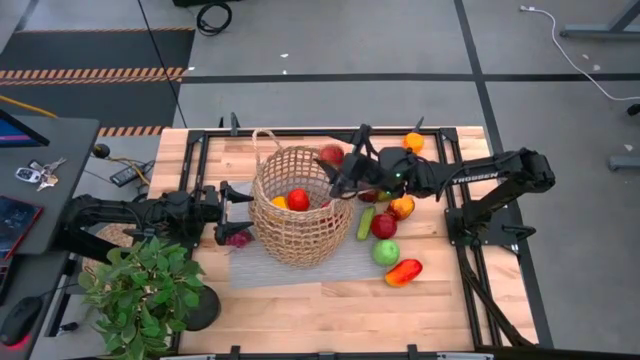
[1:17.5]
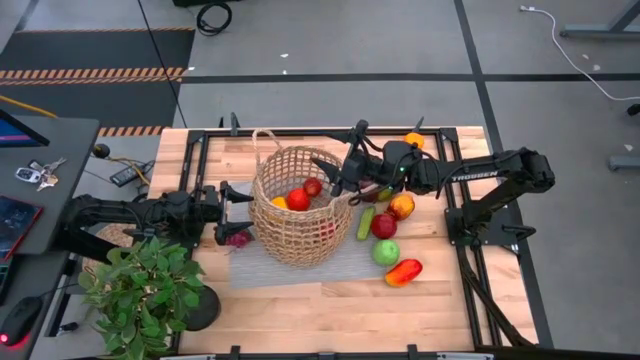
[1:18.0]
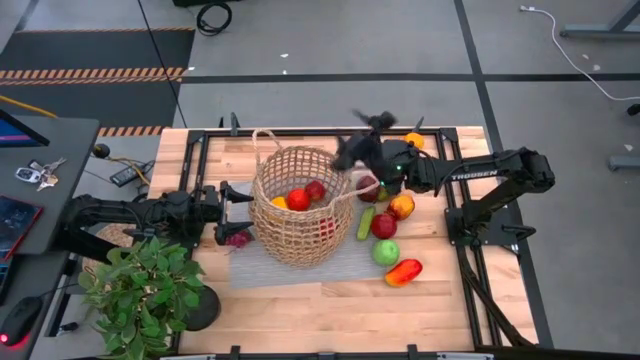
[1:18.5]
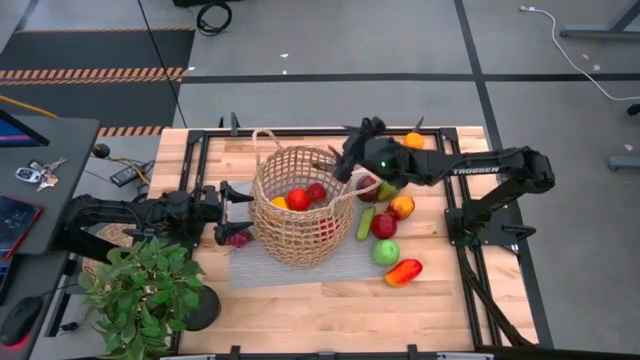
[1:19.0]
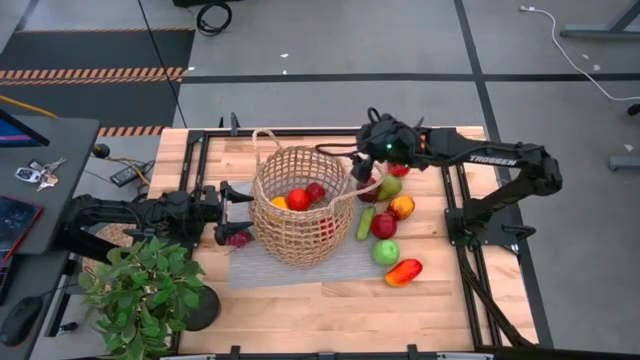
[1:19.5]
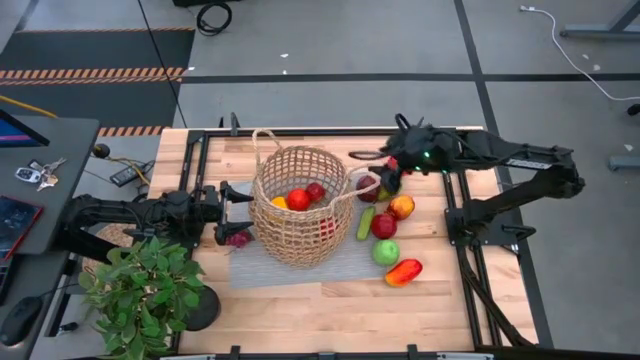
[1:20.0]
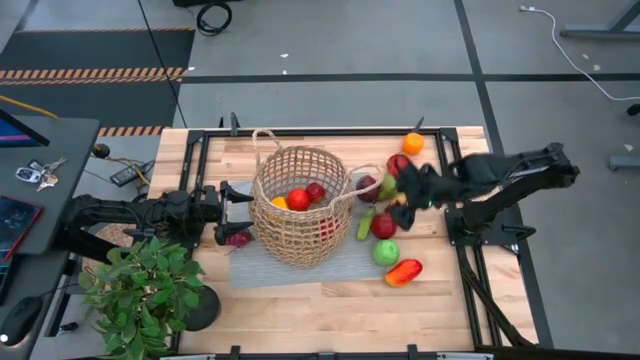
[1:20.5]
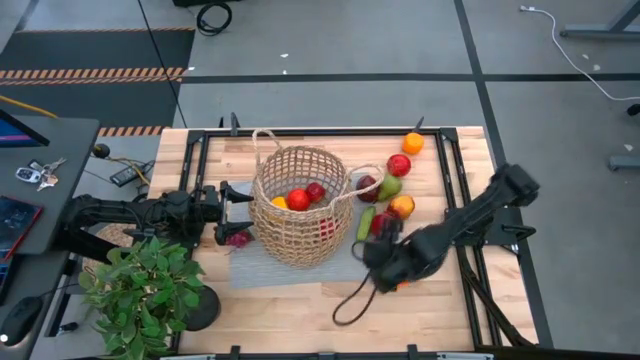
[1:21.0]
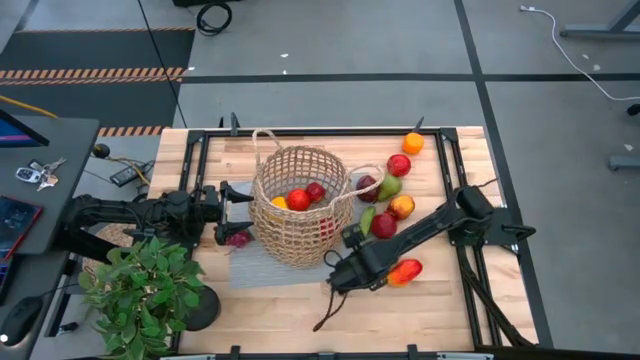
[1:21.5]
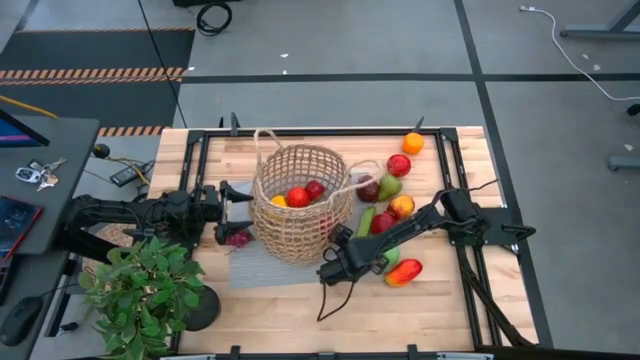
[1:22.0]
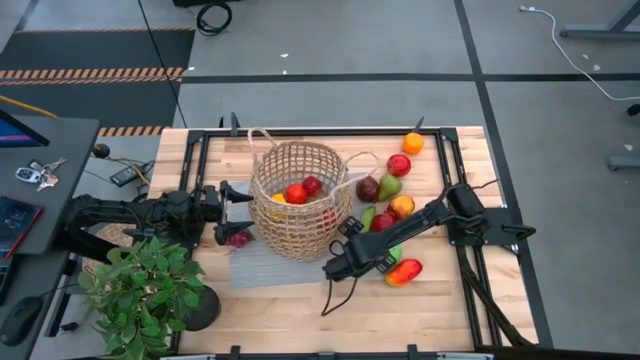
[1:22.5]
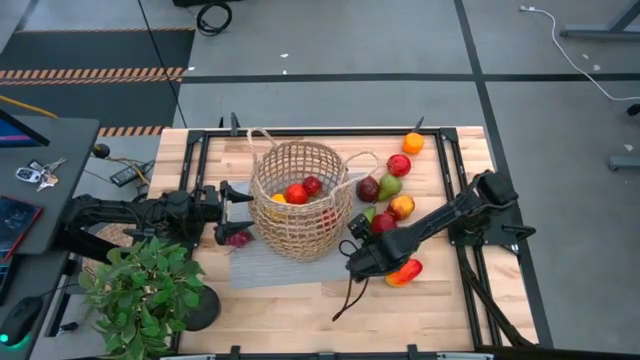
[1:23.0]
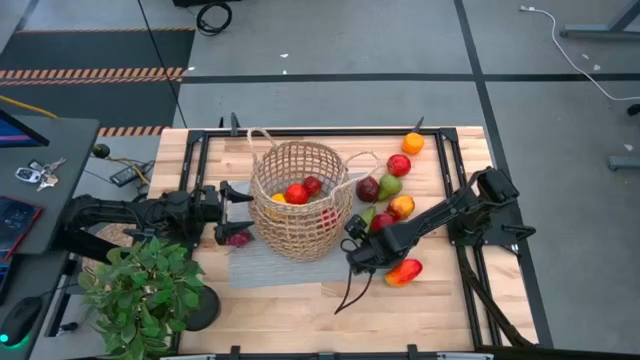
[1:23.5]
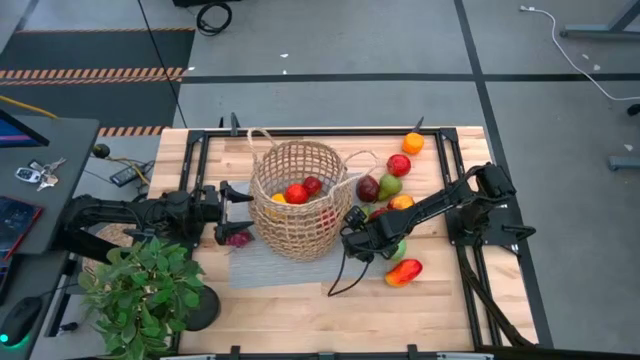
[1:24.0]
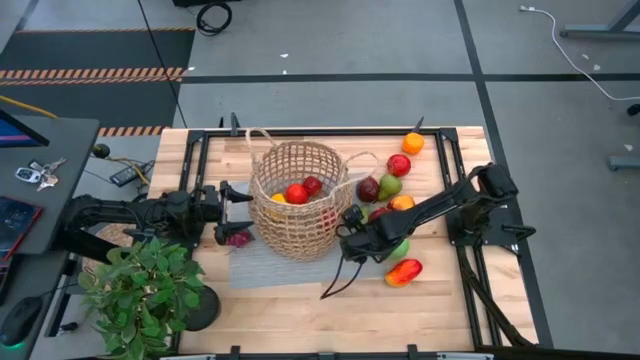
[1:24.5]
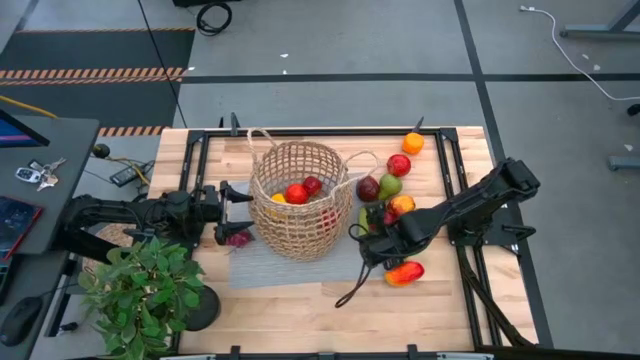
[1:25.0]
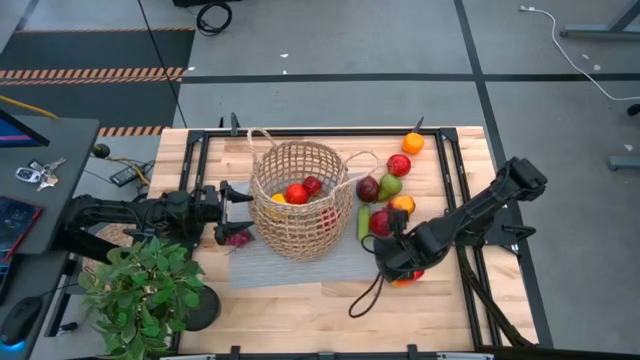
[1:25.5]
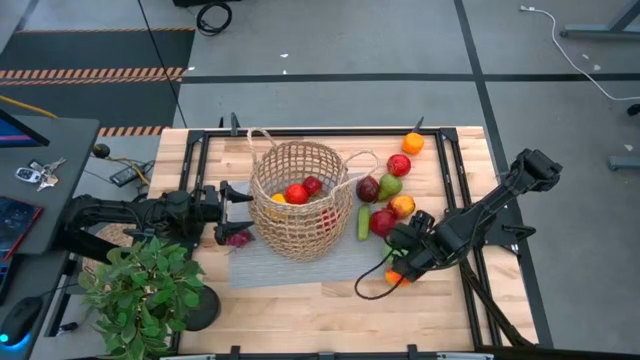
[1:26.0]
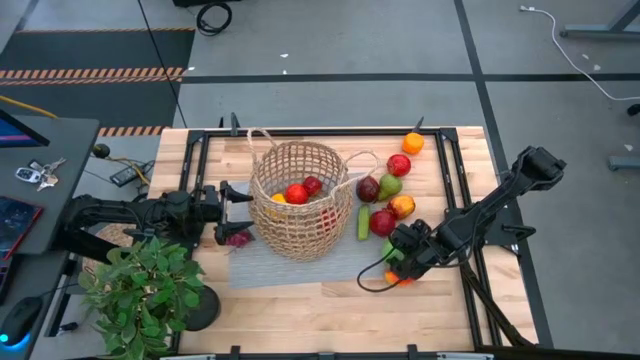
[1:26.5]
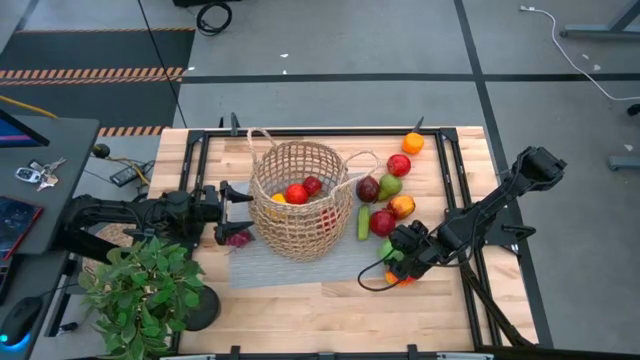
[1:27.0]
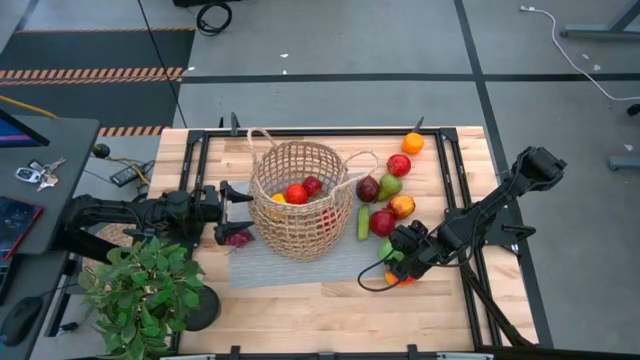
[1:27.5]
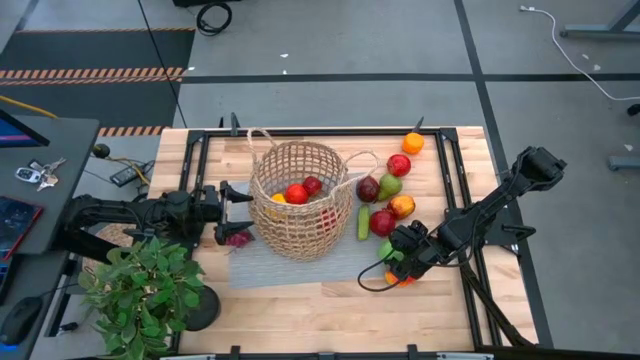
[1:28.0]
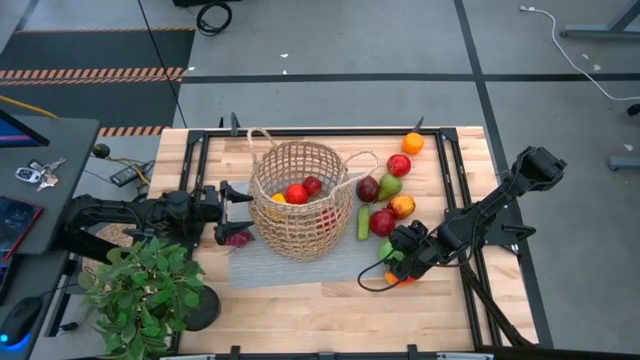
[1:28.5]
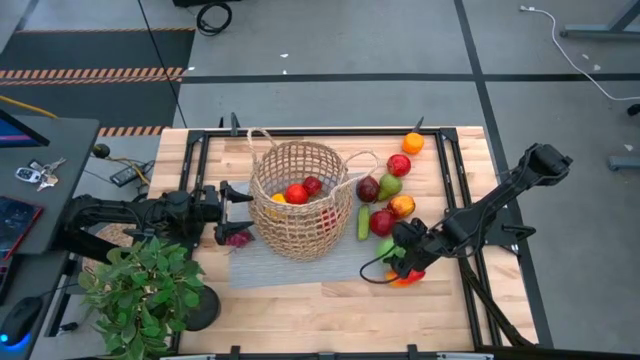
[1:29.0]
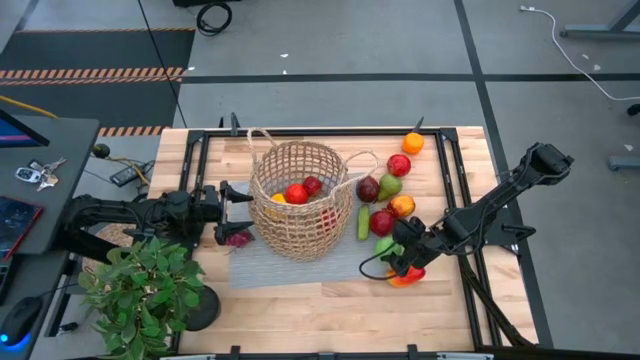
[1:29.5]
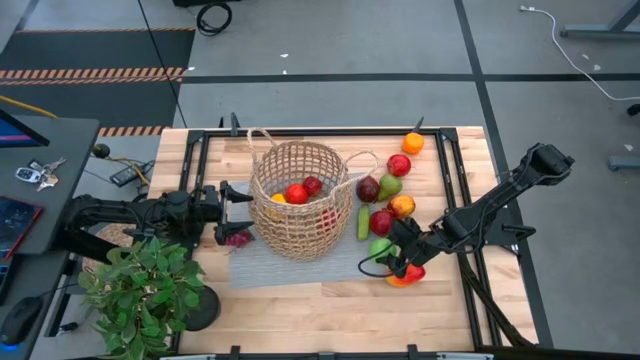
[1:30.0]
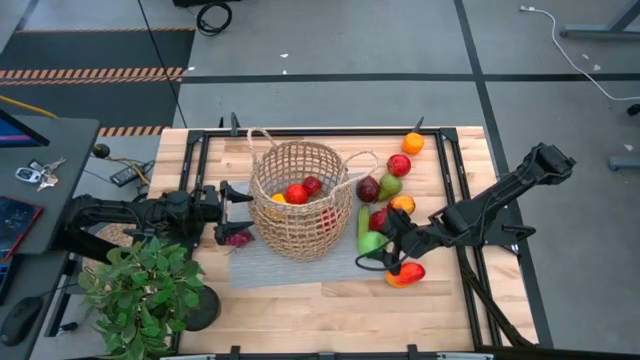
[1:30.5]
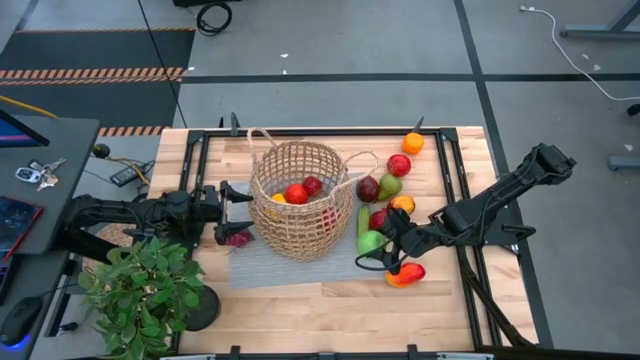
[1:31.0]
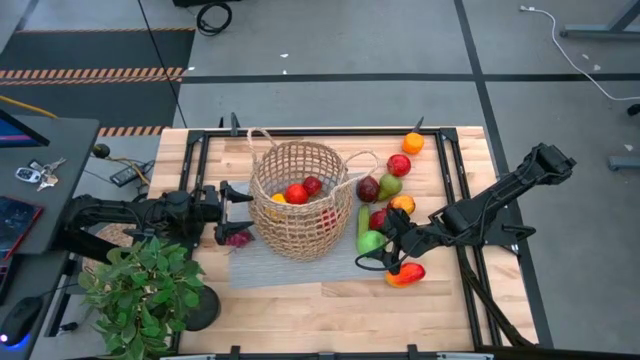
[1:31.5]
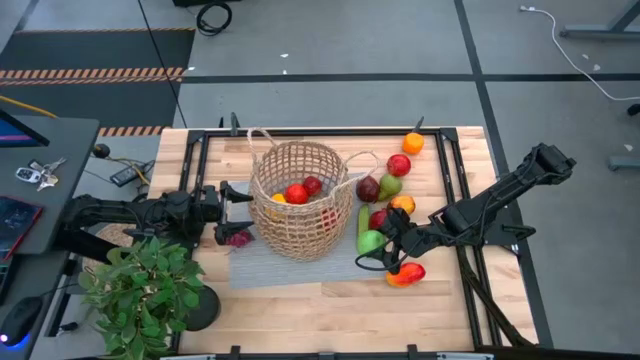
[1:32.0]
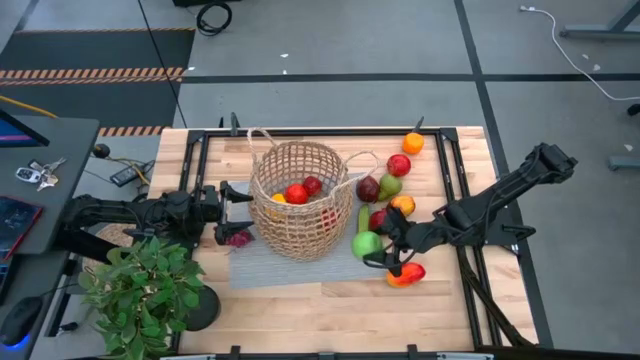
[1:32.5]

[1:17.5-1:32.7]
Task: Build produce basket
Put the green apple into the brown basket

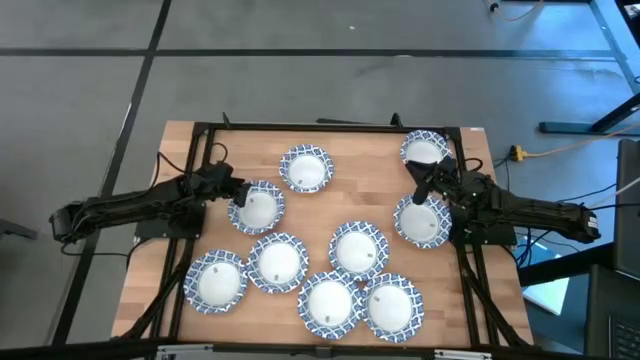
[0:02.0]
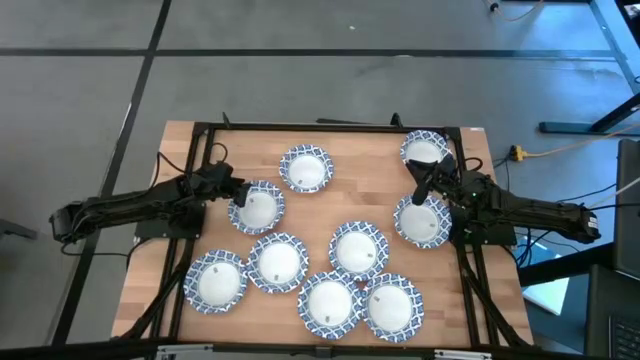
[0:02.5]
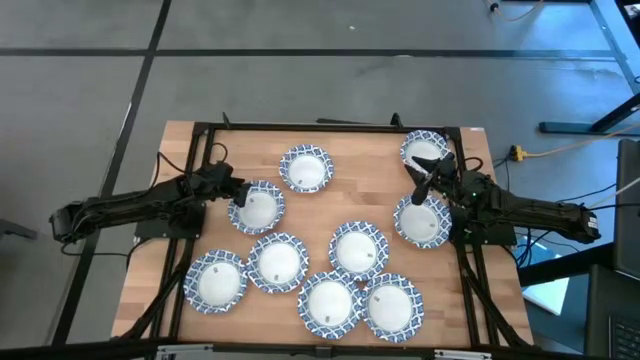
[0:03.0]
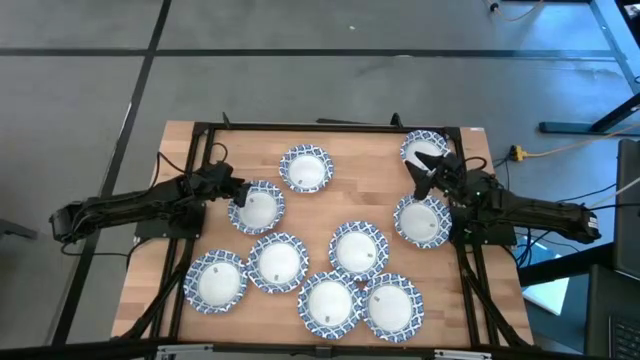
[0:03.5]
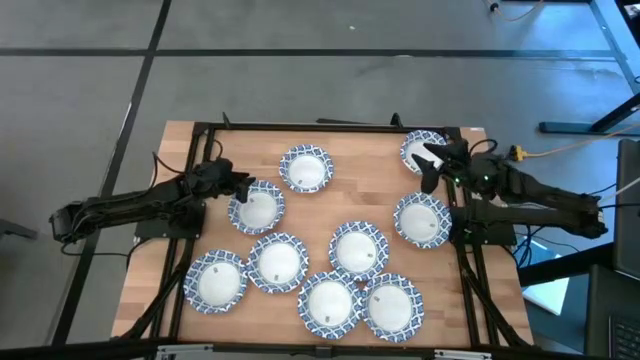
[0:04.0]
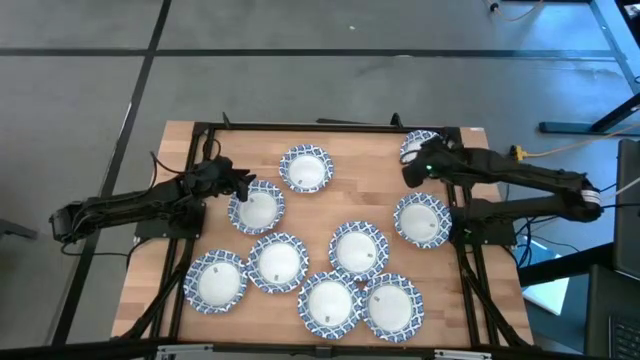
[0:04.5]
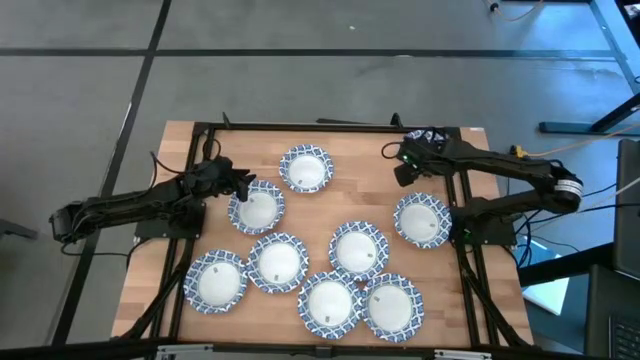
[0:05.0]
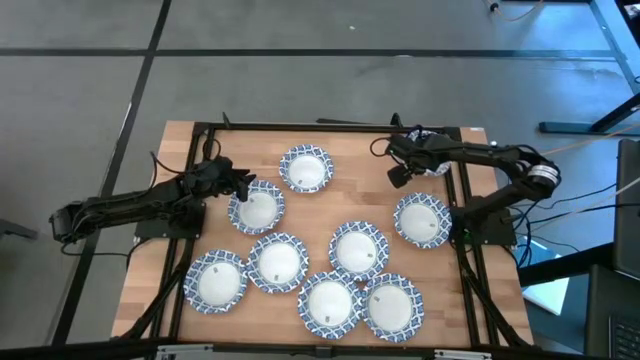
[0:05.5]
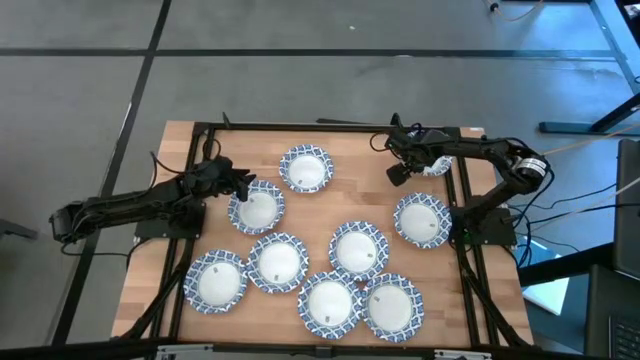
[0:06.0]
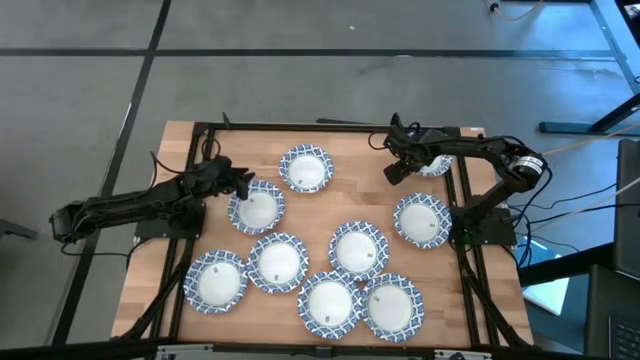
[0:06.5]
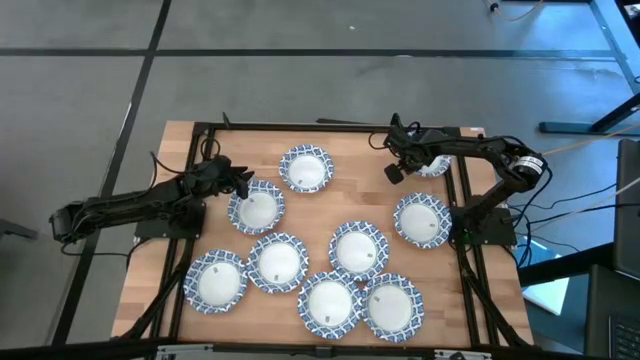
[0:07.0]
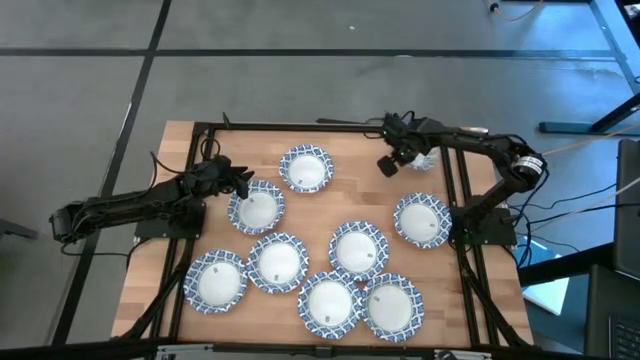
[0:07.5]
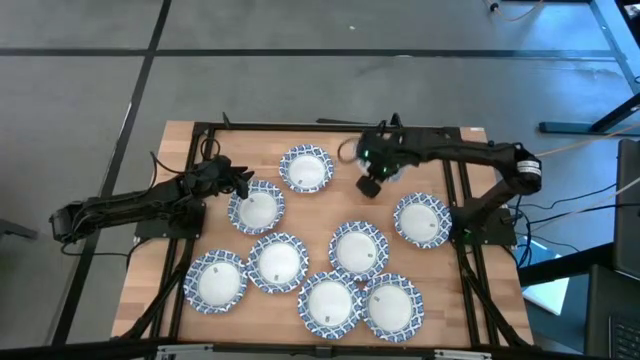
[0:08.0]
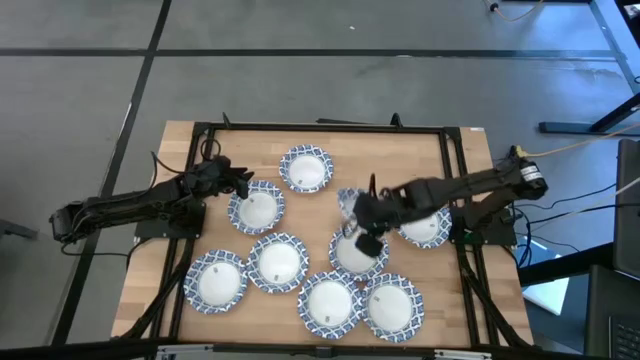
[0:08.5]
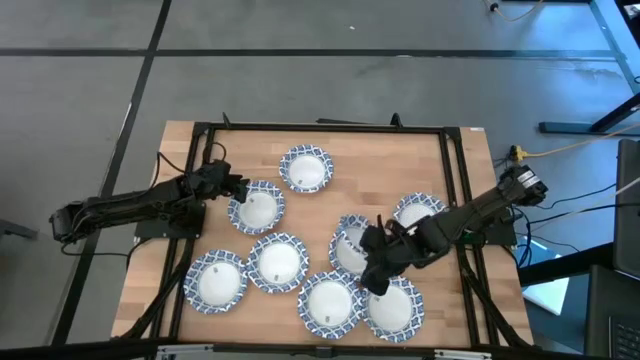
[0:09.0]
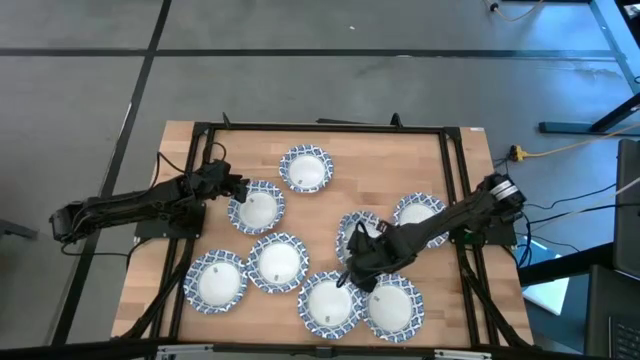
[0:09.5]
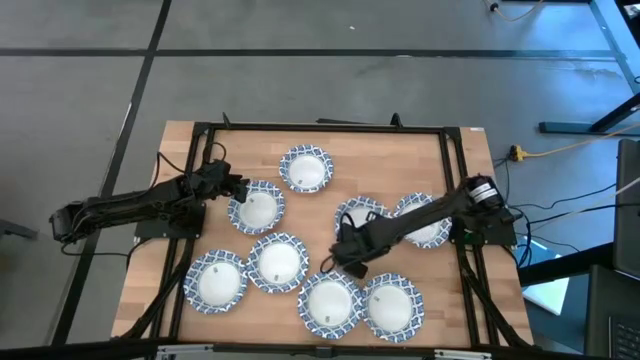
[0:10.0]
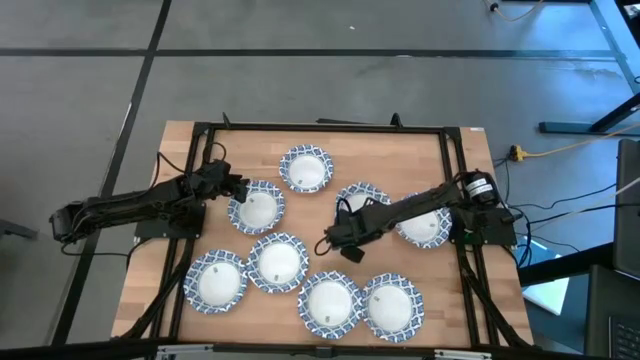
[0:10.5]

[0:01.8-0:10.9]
Task: Nest bowls inside each other
Stack the white patterned bowl on the white patterned bowl
